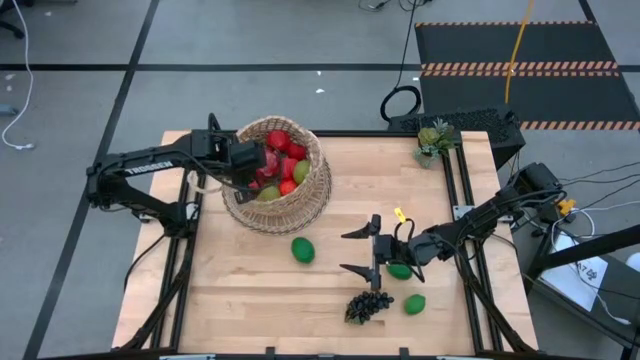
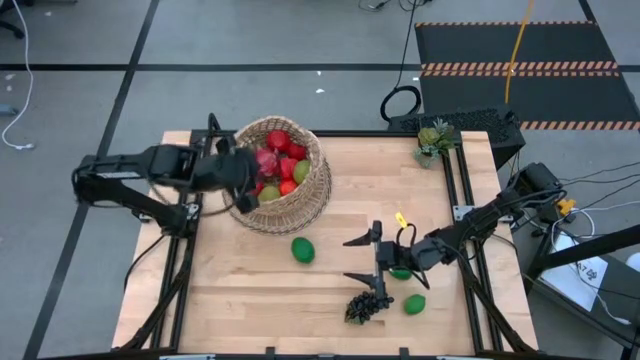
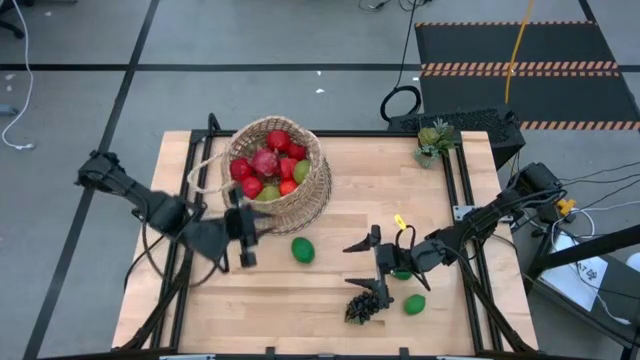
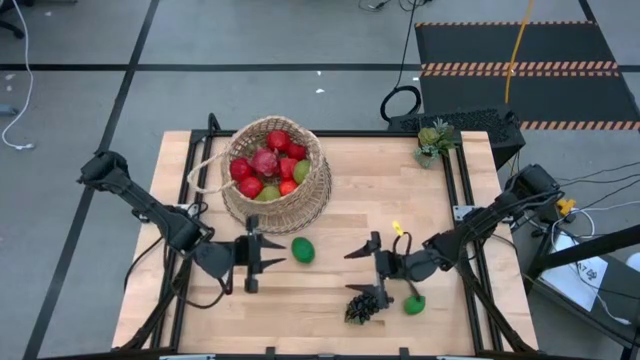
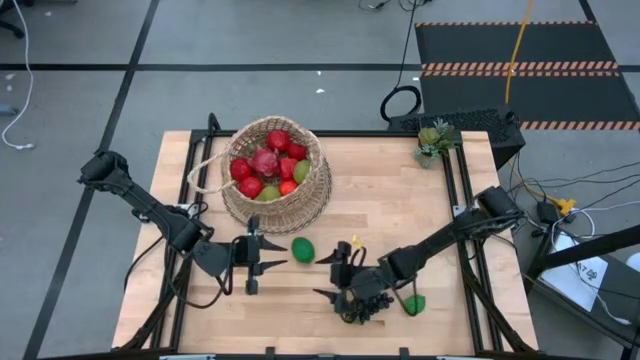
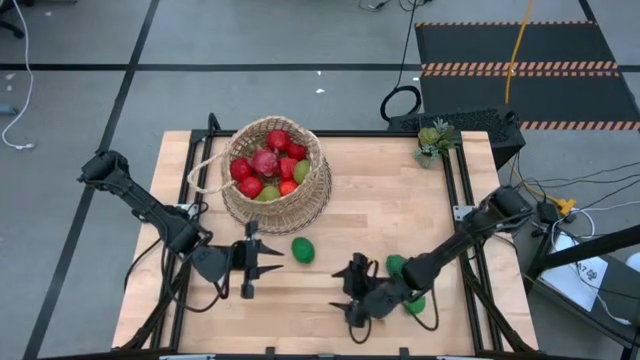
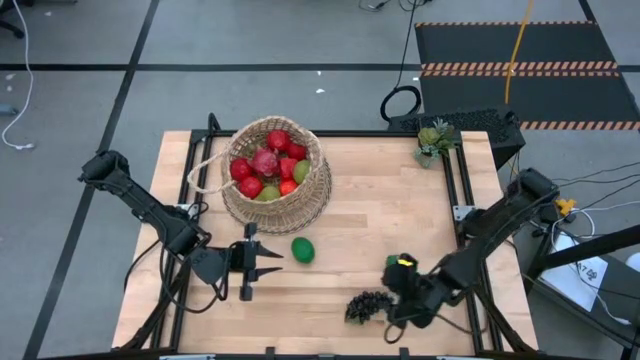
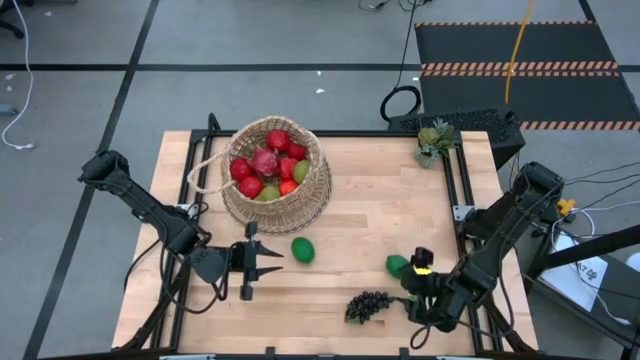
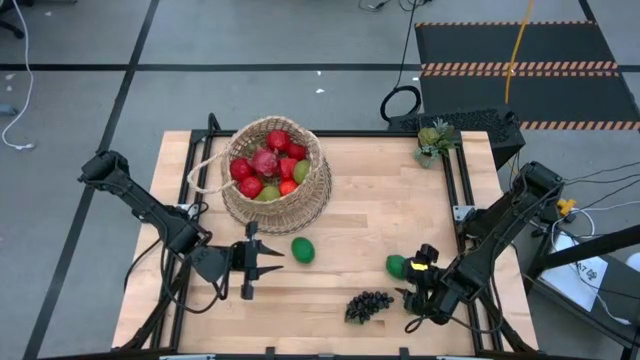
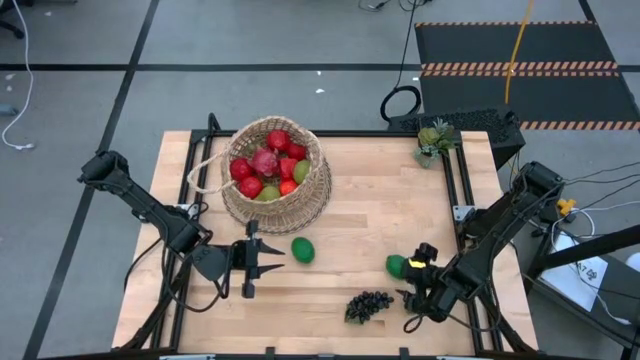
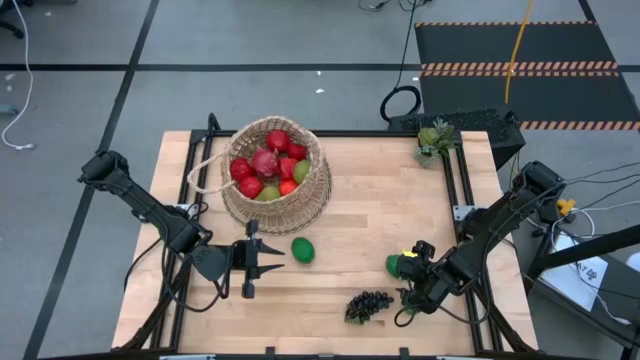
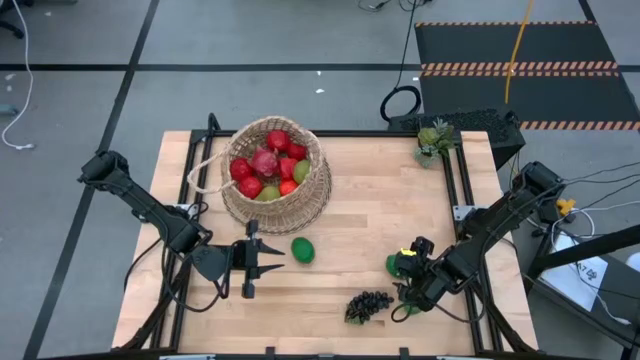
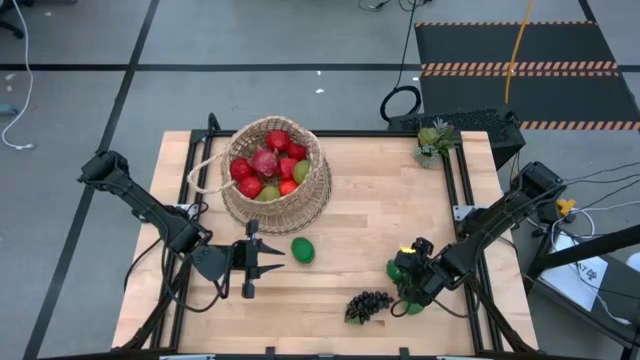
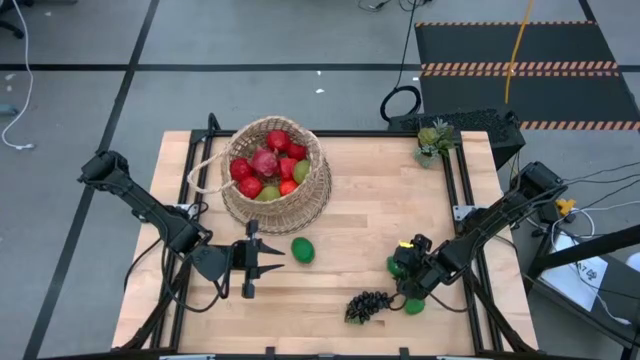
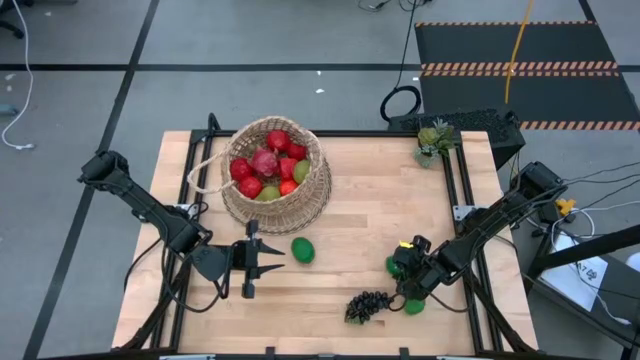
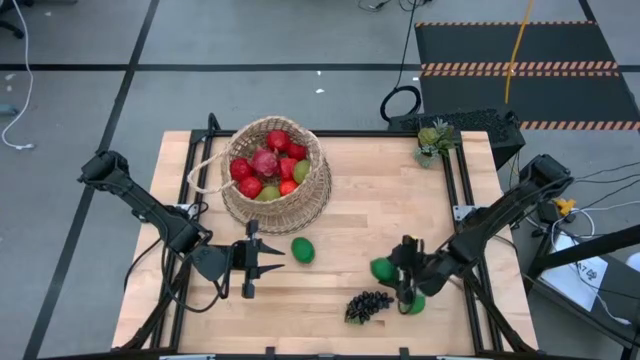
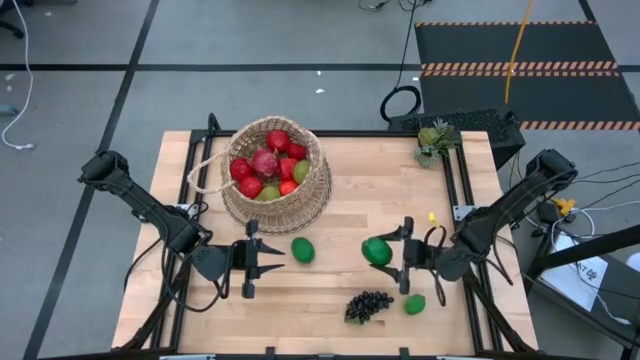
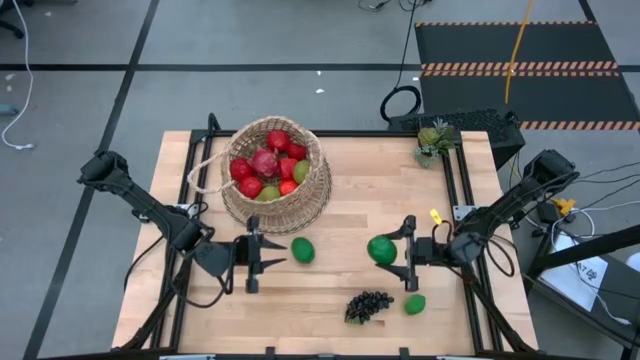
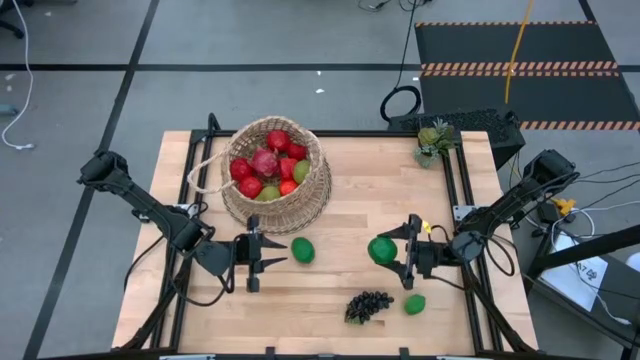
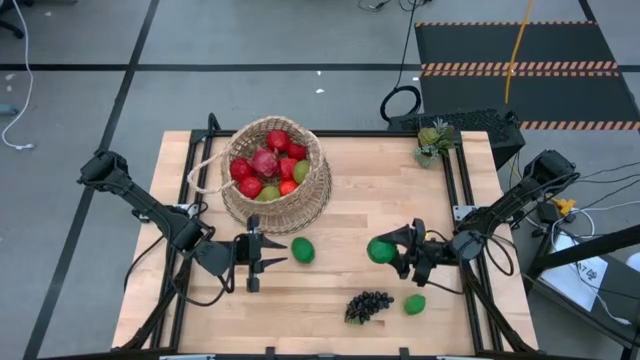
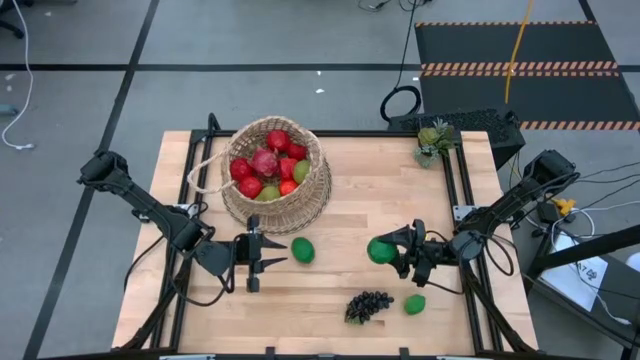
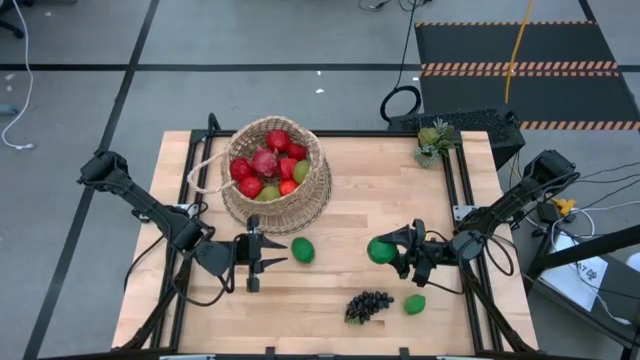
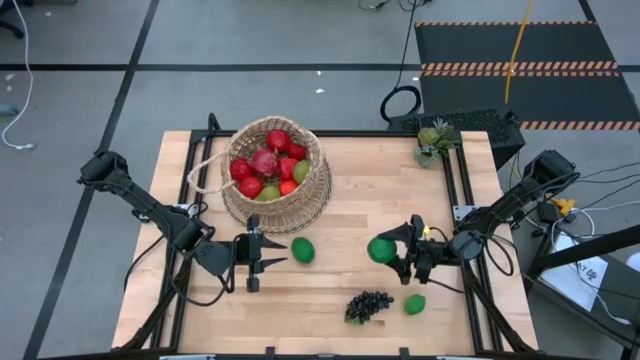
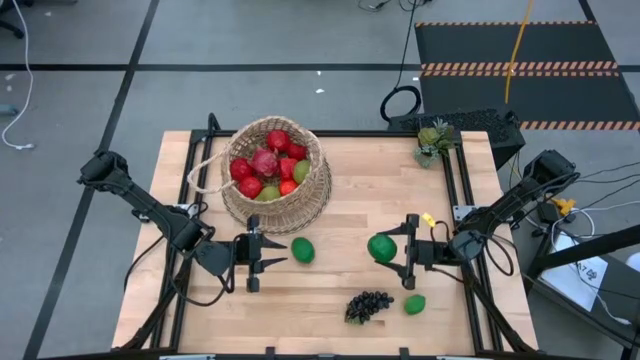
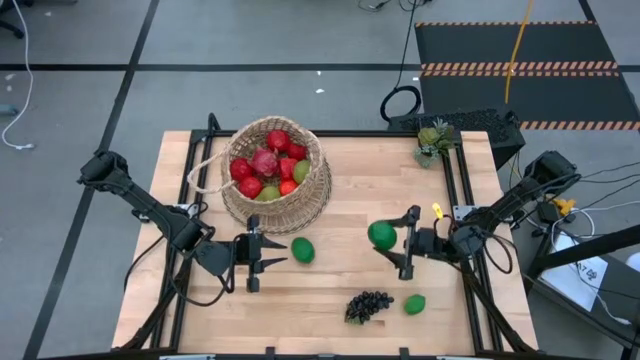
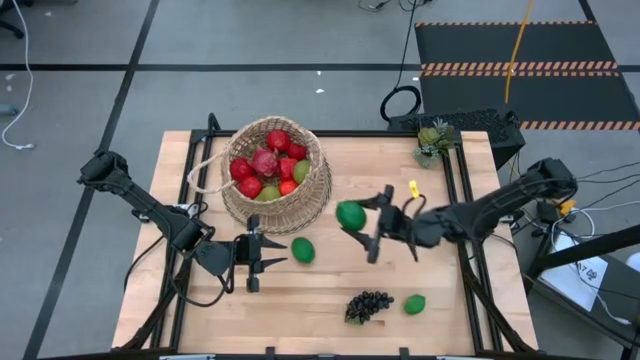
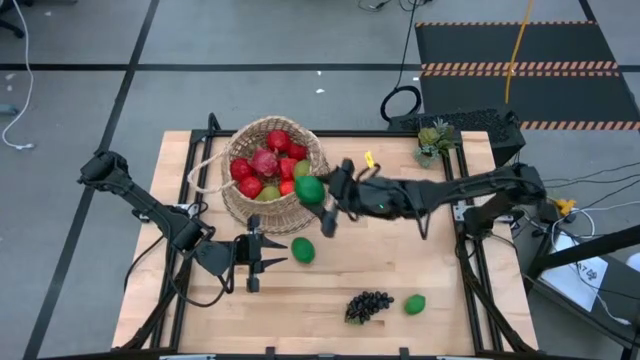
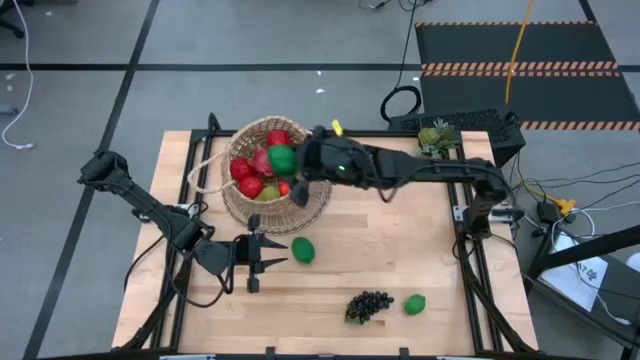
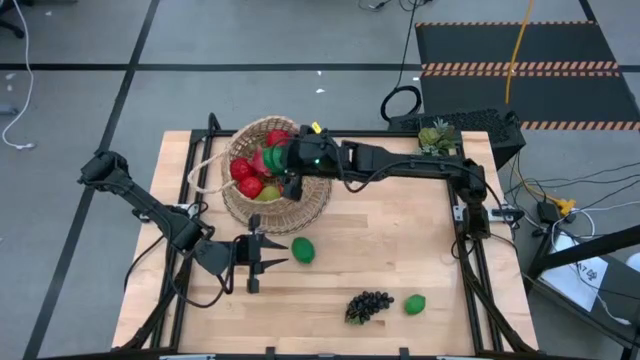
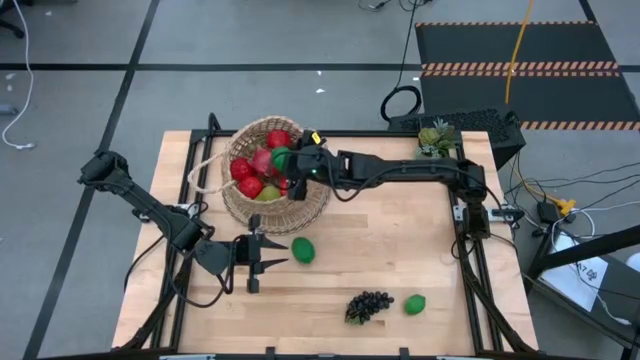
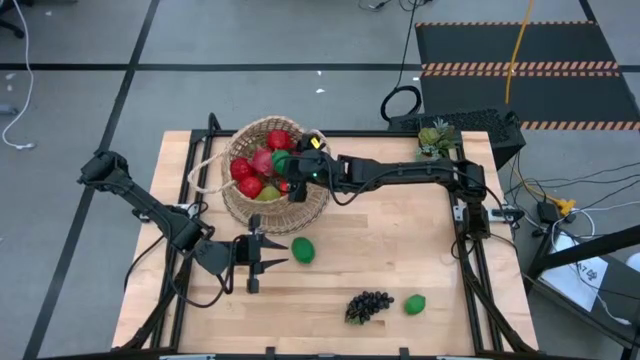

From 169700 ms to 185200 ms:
Task: Build produce basket
Put the lime into the basket

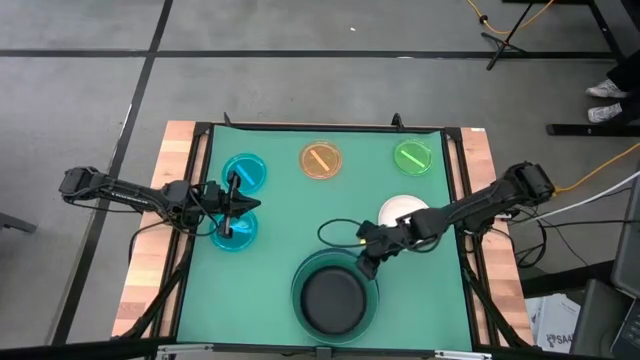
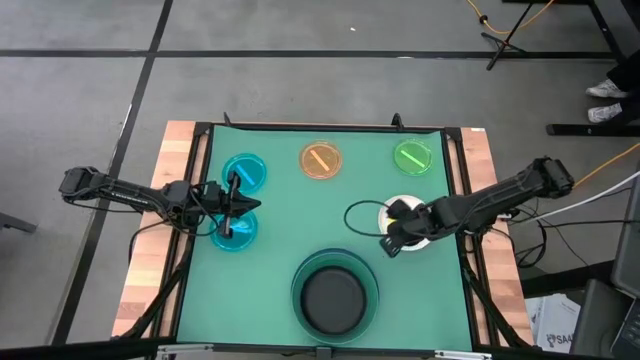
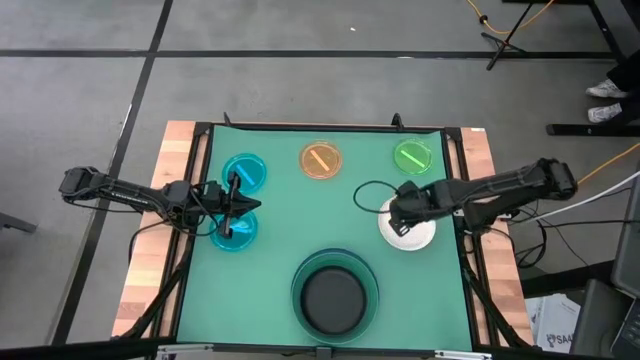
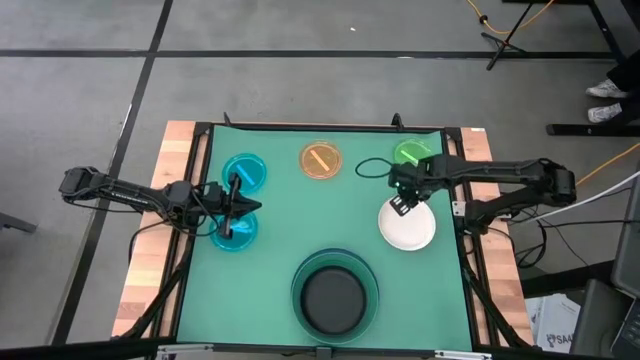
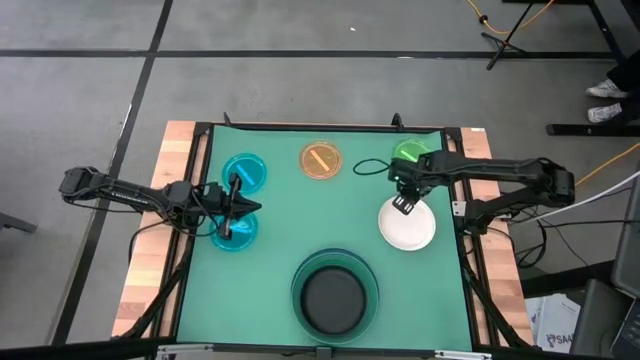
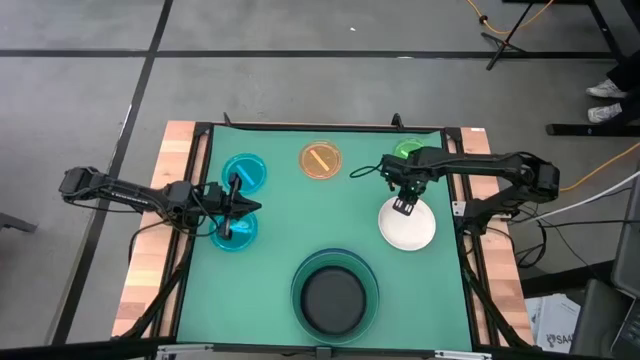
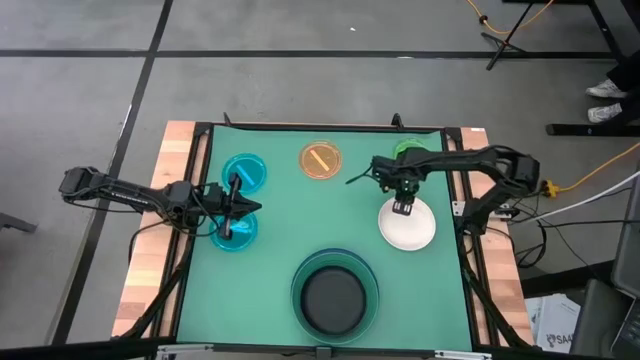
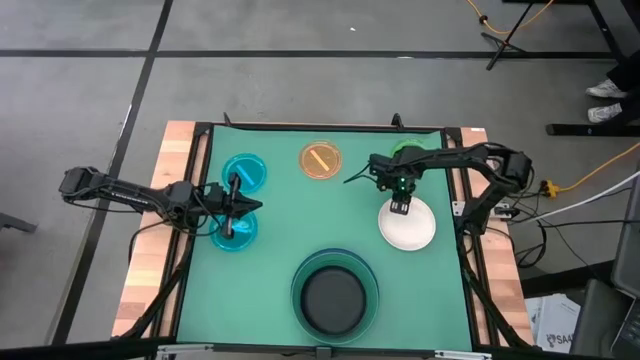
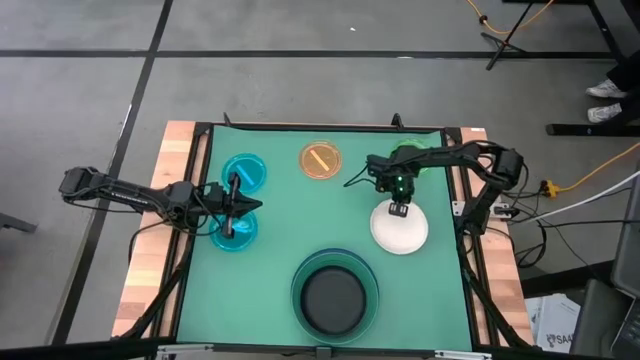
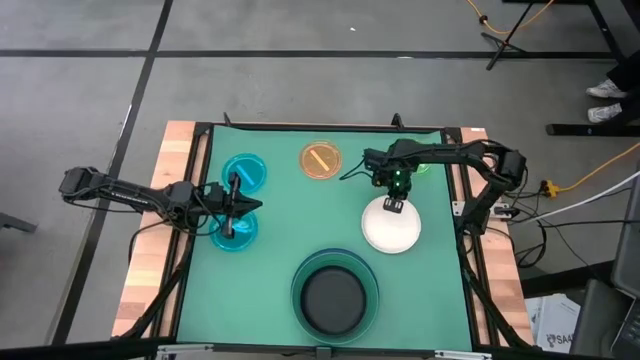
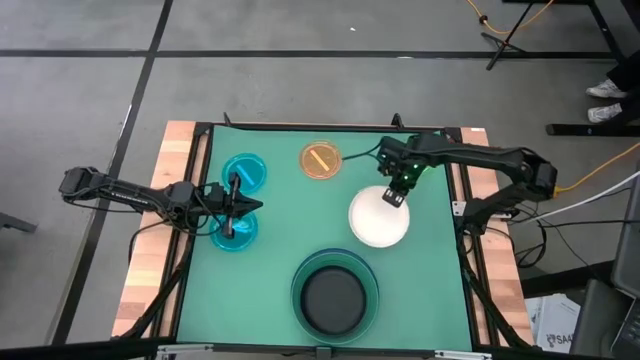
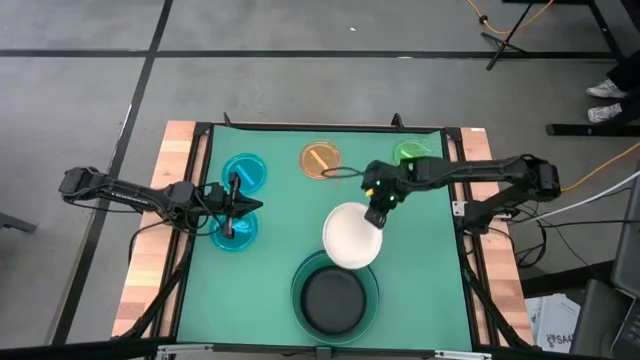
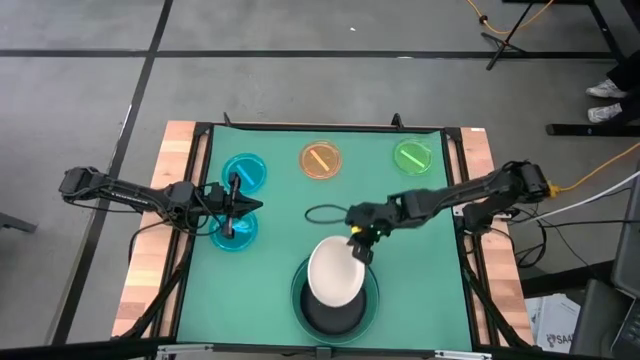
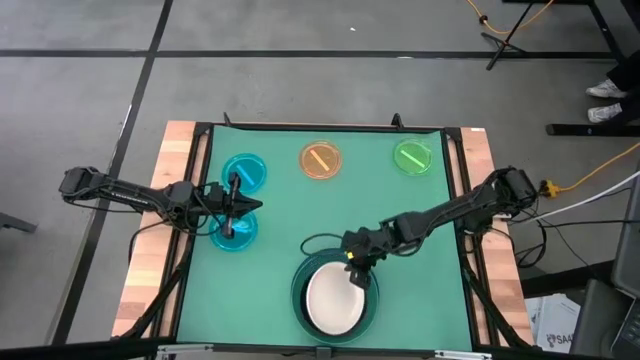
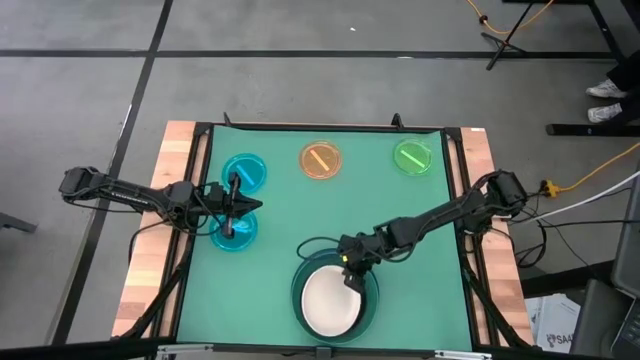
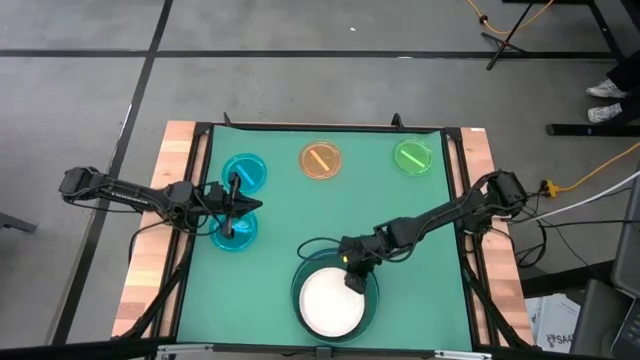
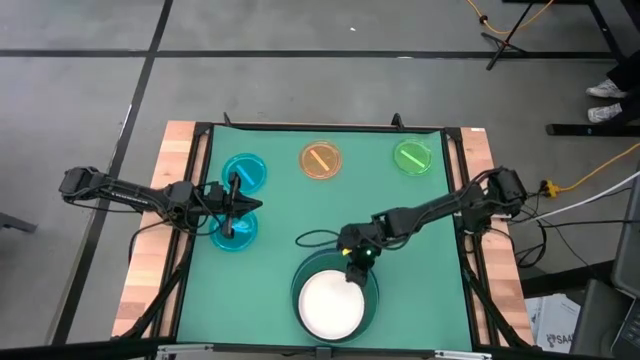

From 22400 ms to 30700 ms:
Task: Stack plastic plates
Stack the white plate on top of the black plate
